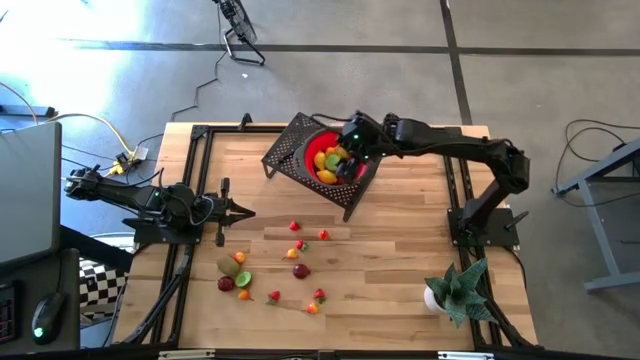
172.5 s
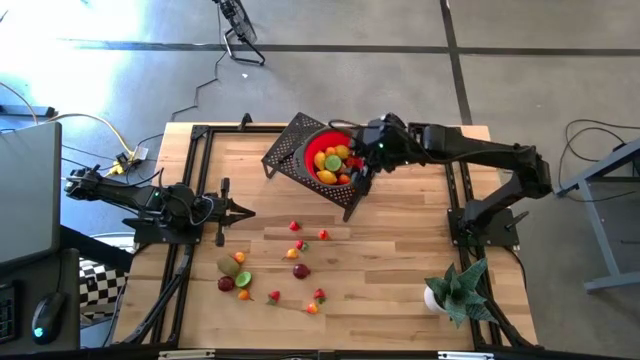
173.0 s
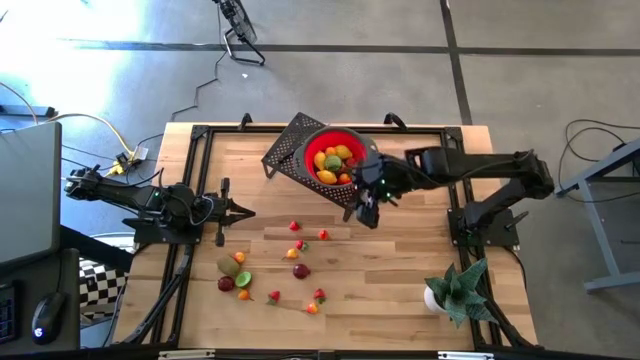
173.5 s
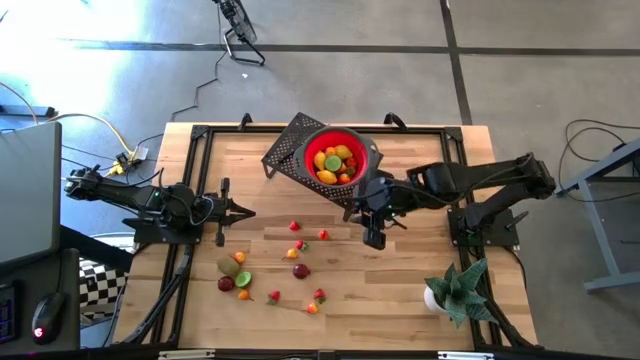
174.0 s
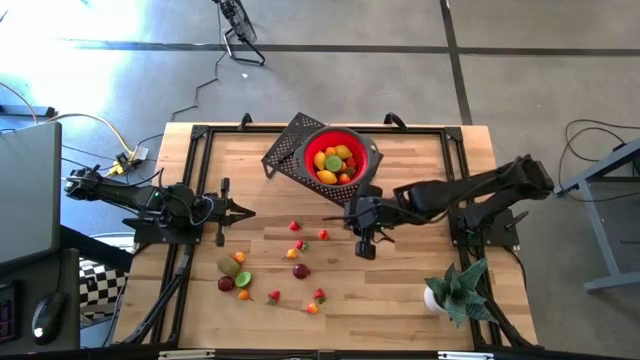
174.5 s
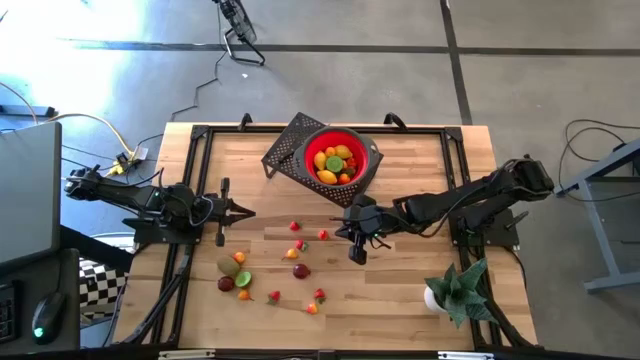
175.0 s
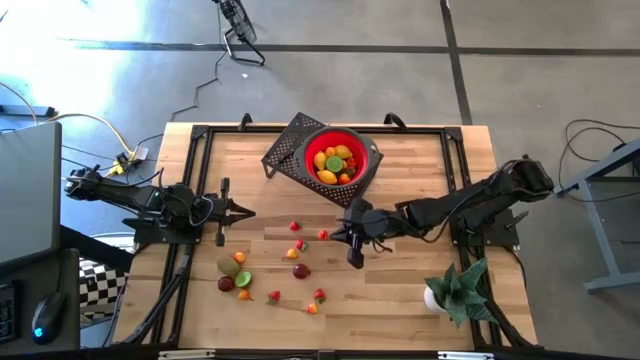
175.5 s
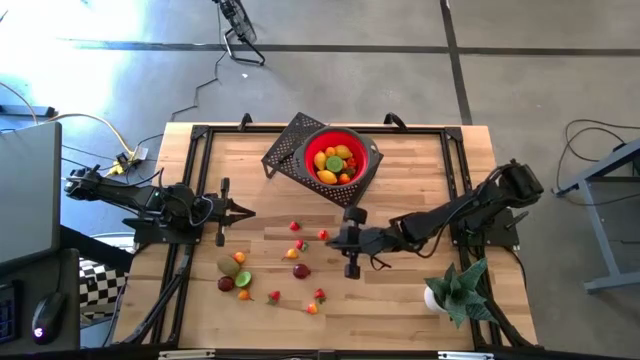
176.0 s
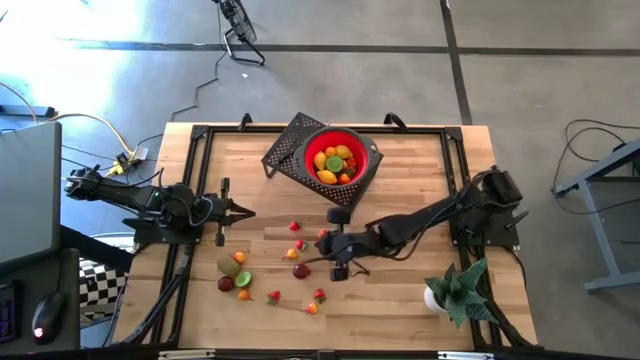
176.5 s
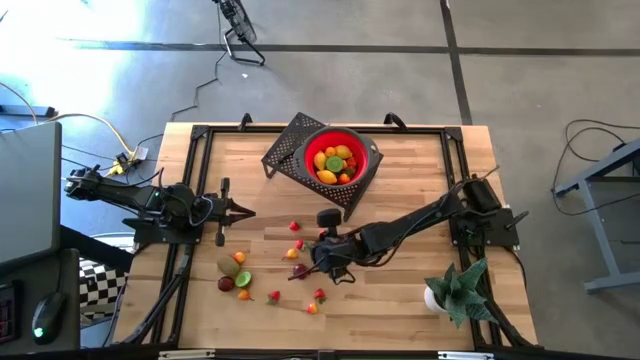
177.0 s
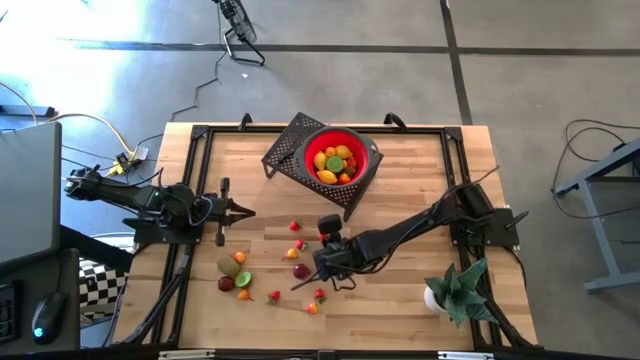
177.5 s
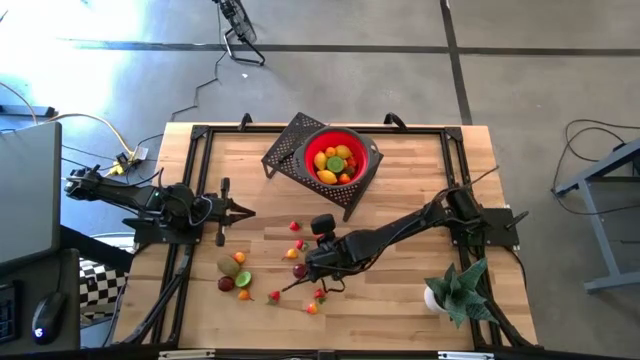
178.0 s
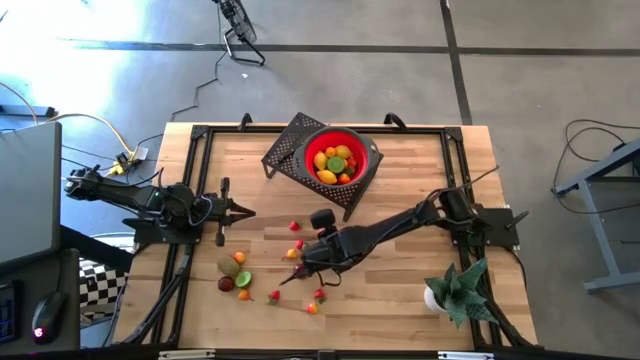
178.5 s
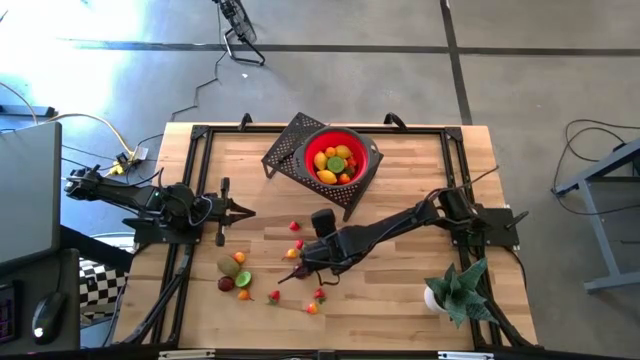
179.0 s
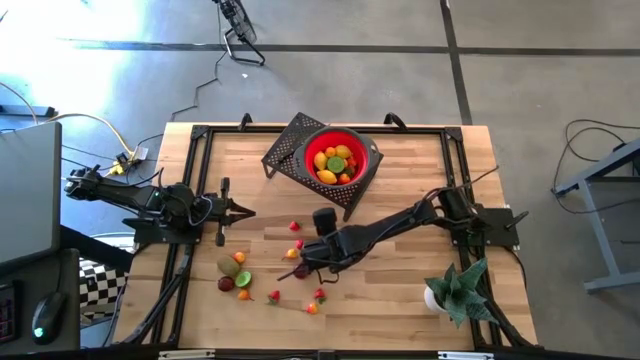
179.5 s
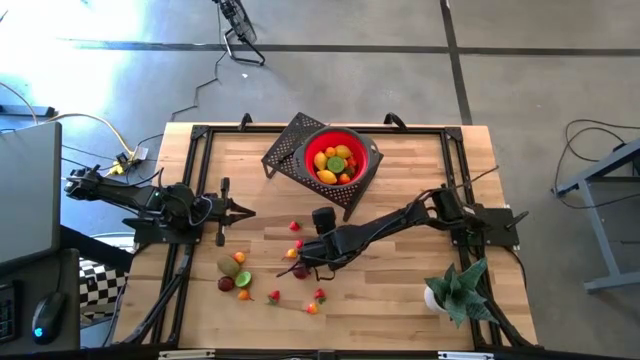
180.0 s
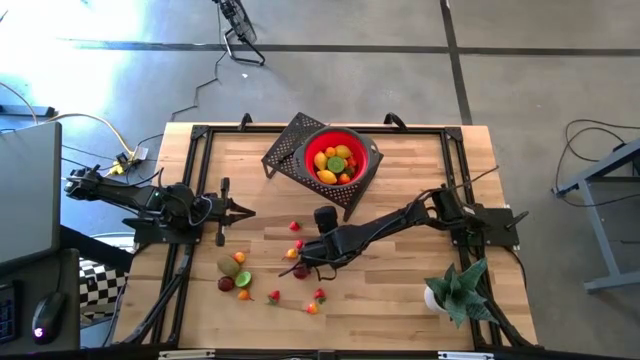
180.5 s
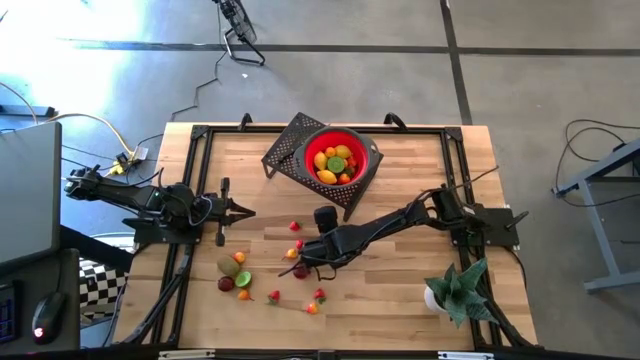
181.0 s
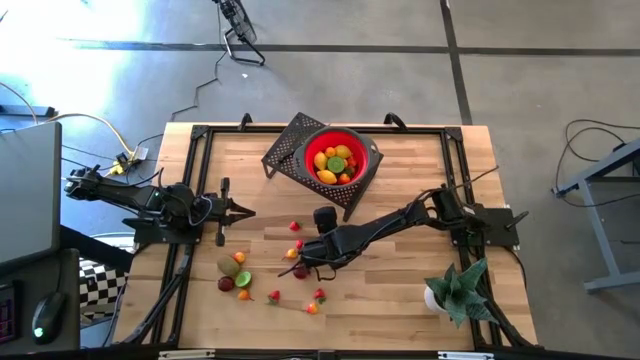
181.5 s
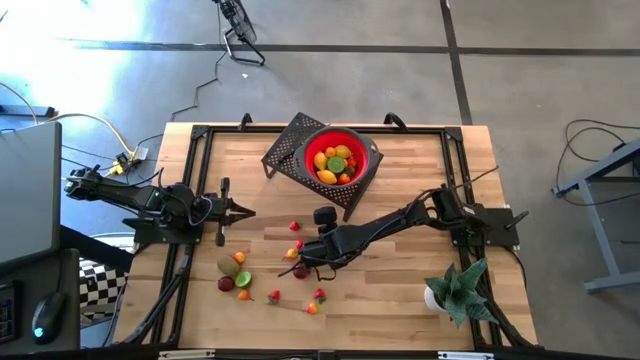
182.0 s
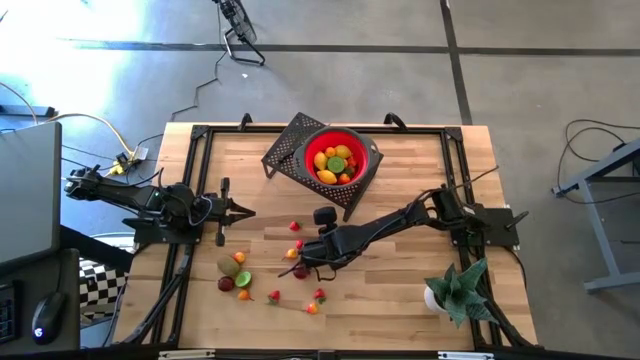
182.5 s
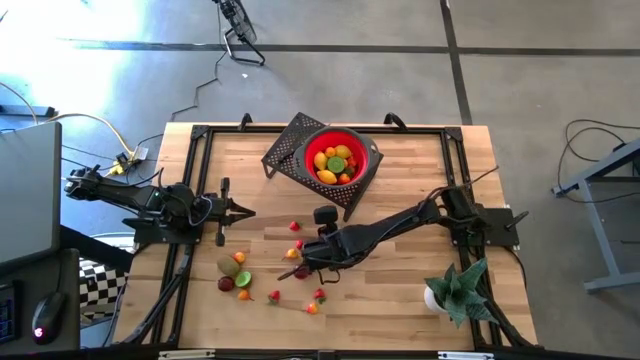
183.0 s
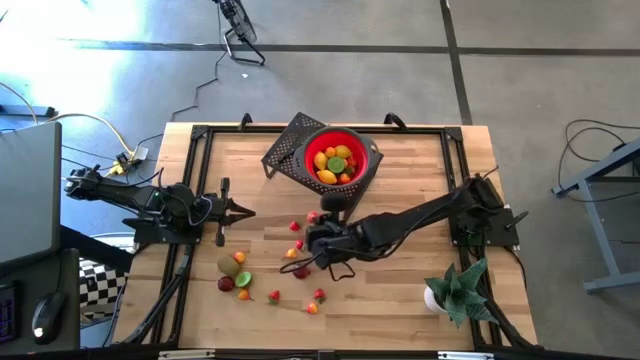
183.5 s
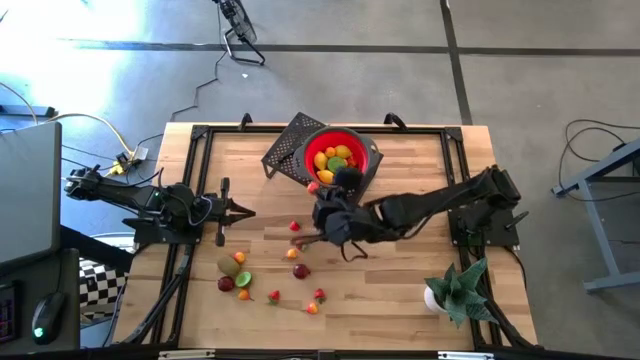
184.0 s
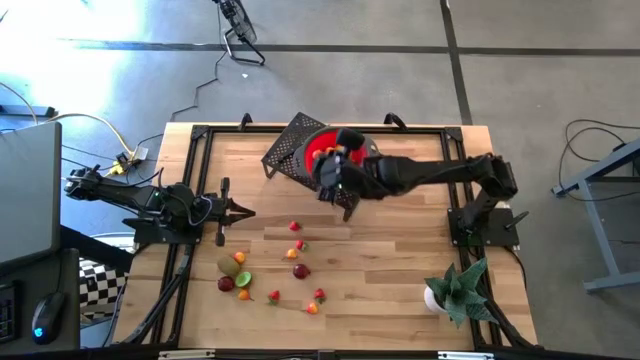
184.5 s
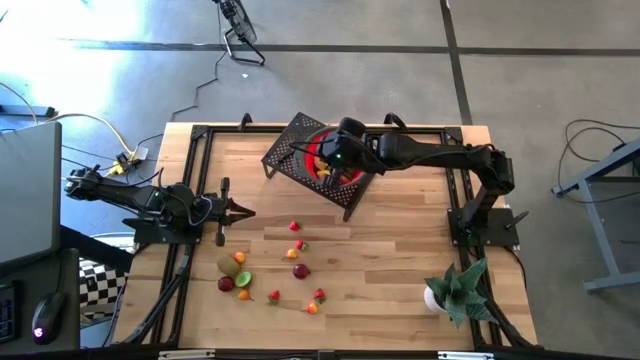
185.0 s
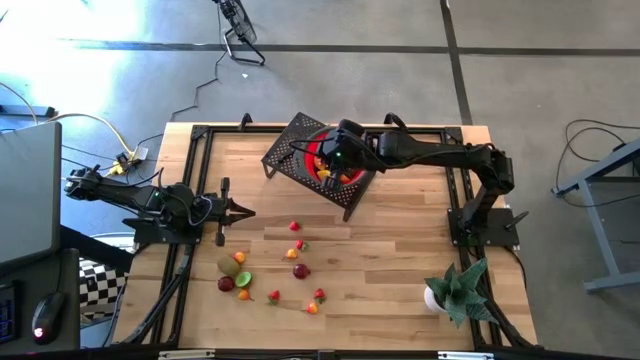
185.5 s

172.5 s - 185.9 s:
Task: Pick & Place Fruit
Put the pear into the strainer bowl on the shelf

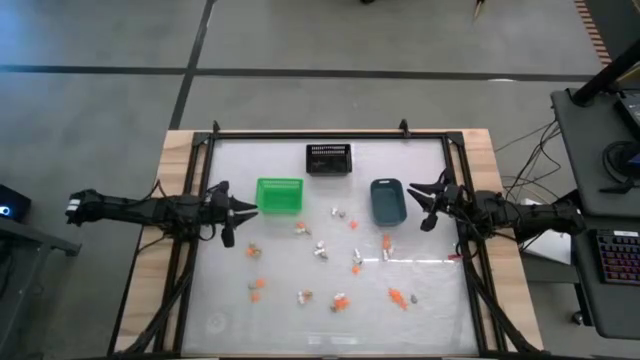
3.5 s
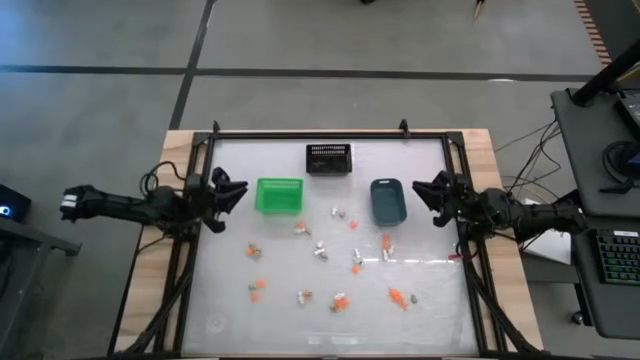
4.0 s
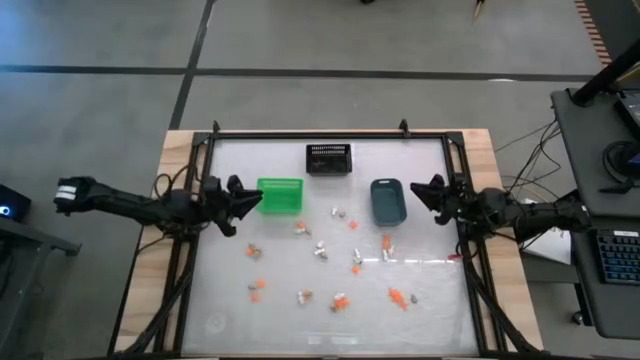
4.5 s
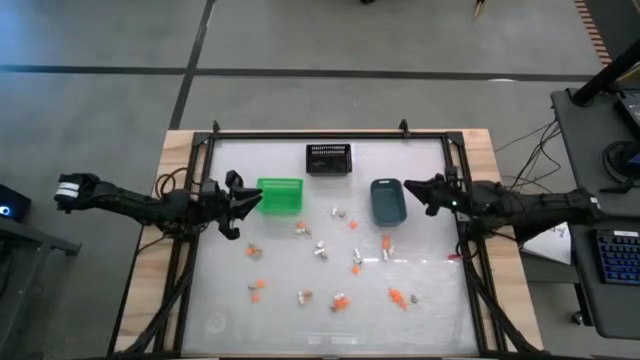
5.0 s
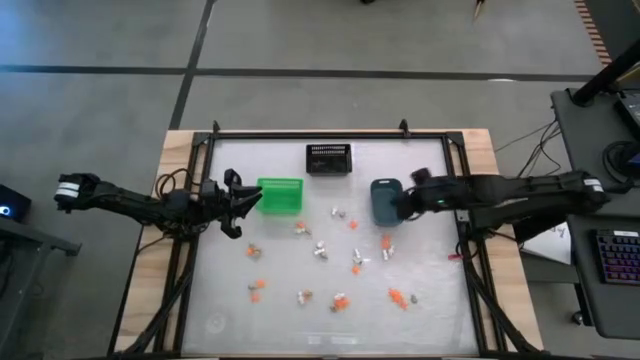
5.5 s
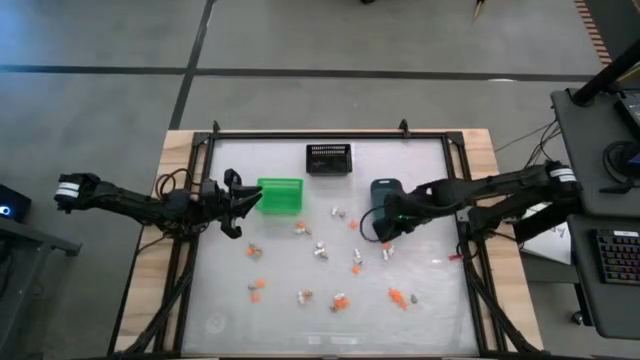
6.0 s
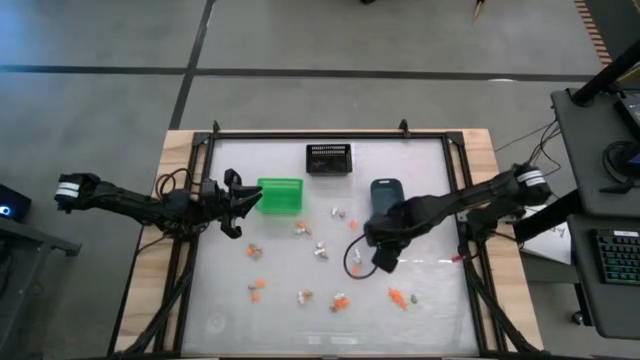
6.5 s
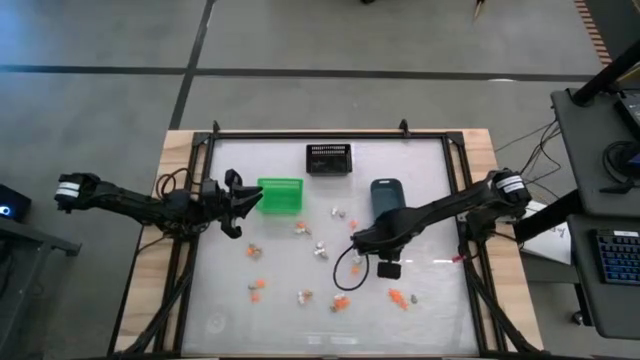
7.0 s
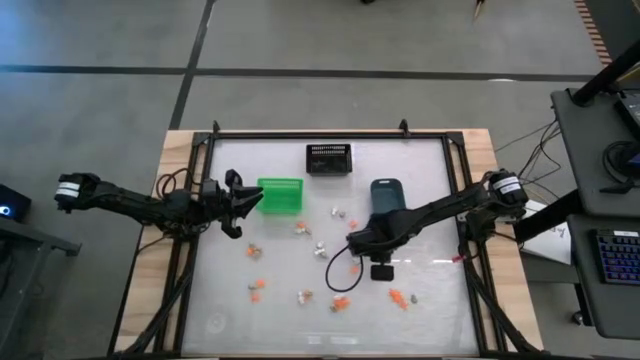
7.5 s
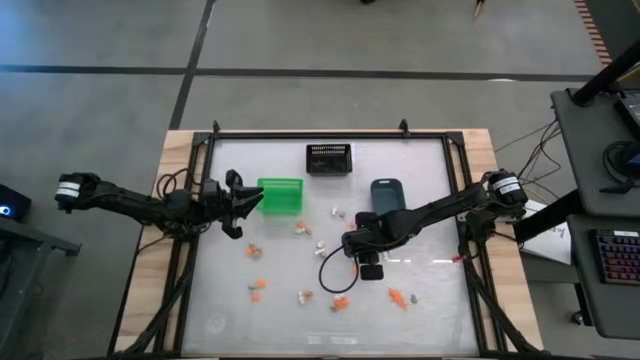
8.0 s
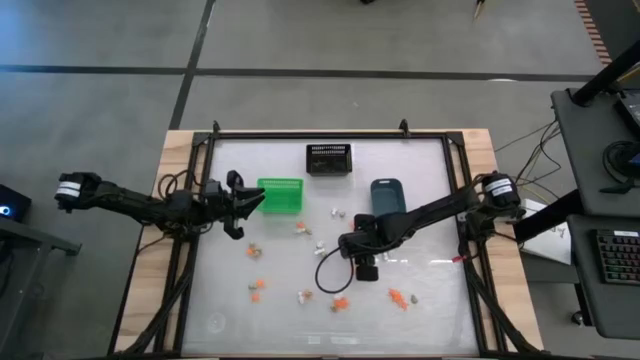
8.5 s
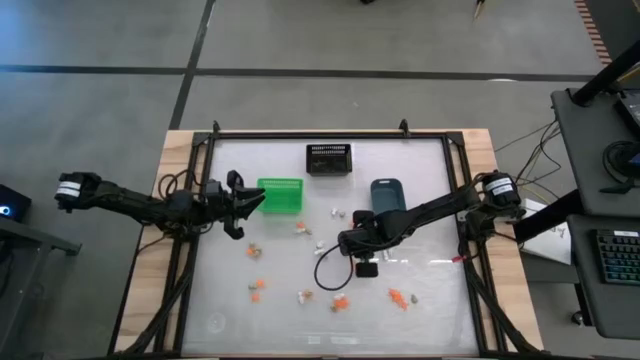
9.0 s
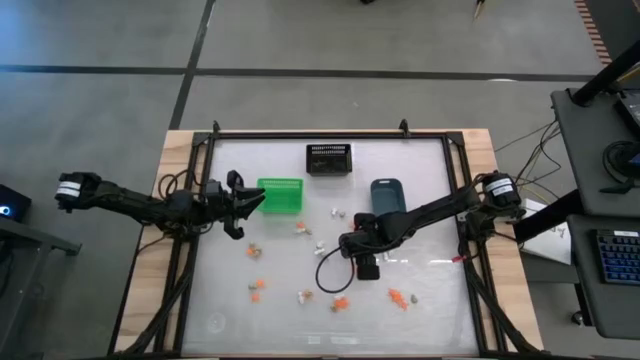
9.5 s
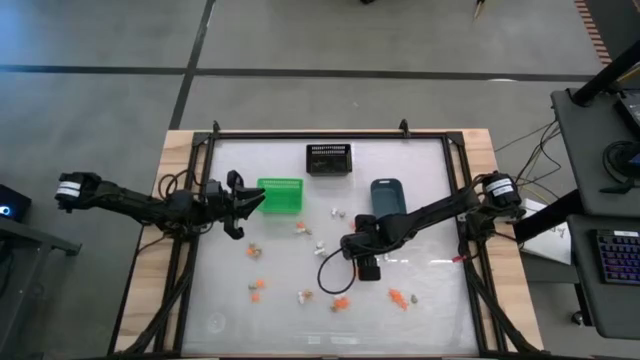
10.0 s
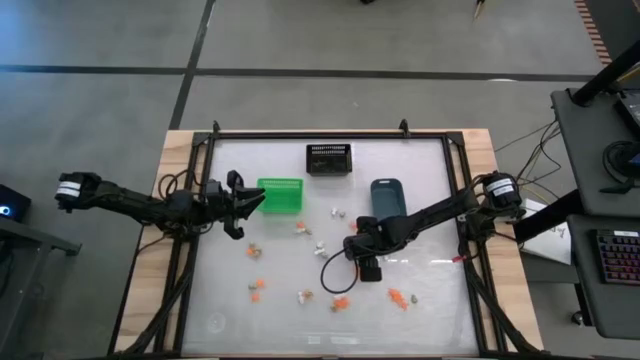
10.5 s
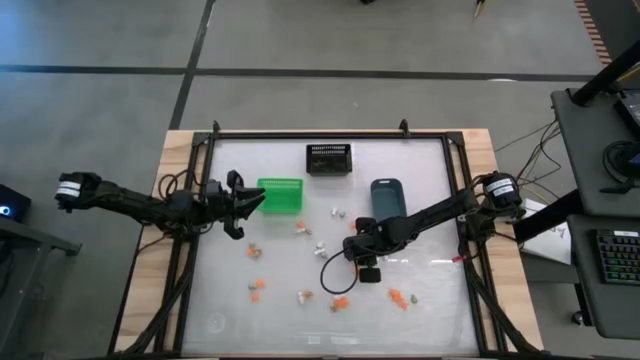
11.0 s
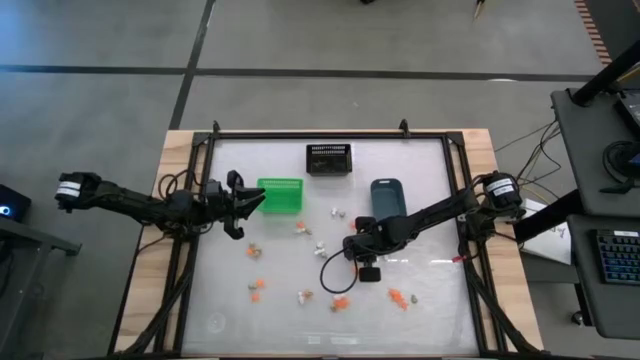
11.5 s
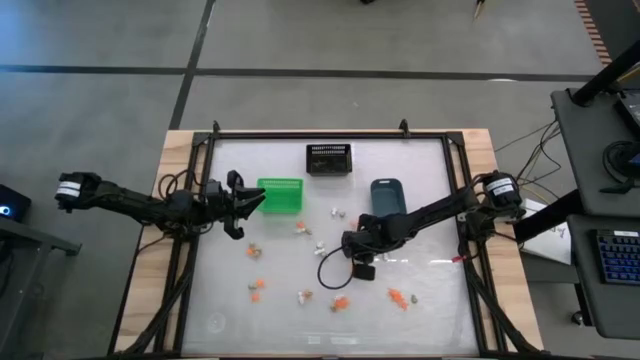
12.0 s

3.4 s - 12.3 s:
Task: Sort Halloween decoration
Put the white skeleton toy into the blue bin
